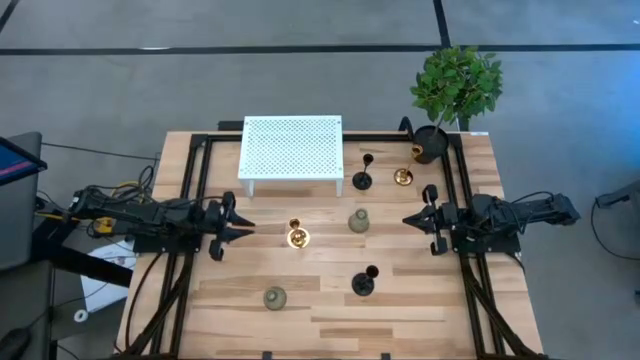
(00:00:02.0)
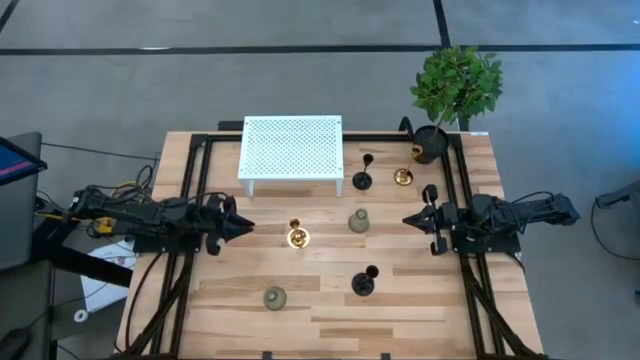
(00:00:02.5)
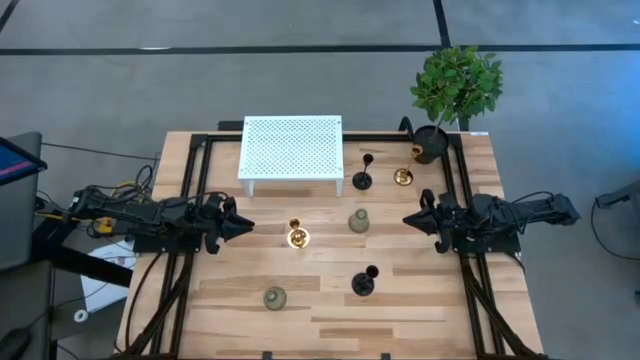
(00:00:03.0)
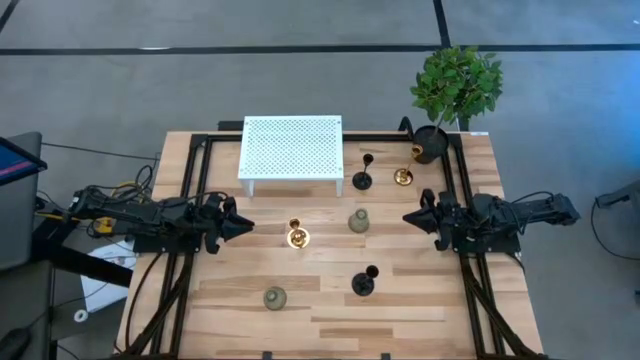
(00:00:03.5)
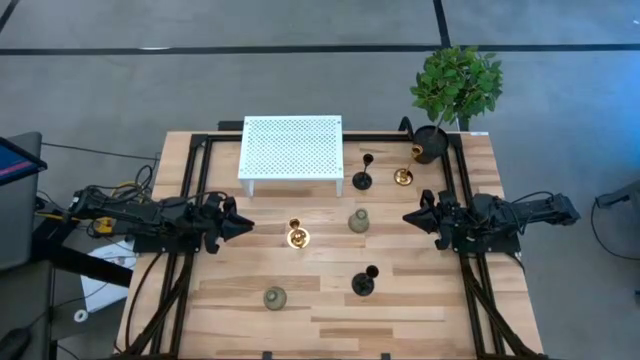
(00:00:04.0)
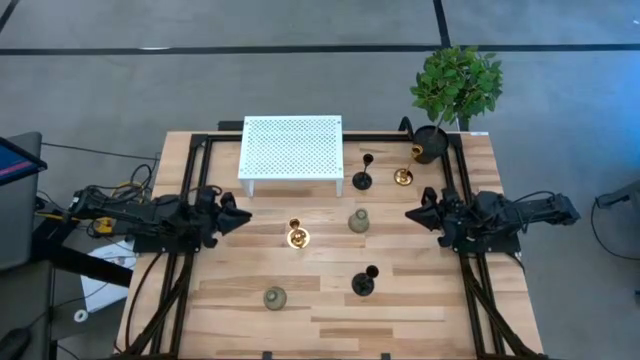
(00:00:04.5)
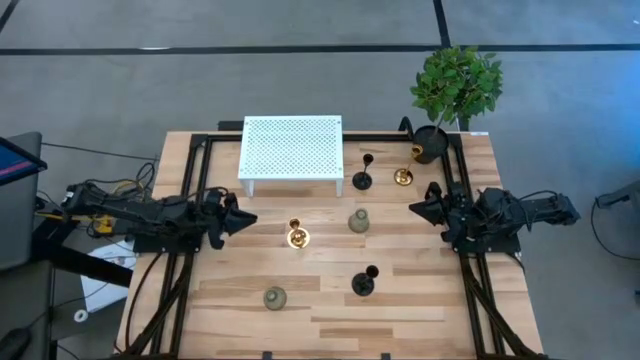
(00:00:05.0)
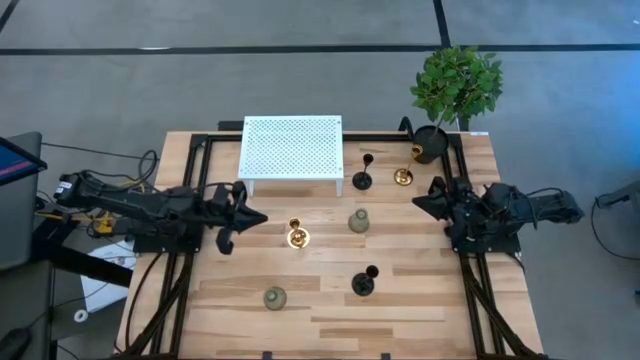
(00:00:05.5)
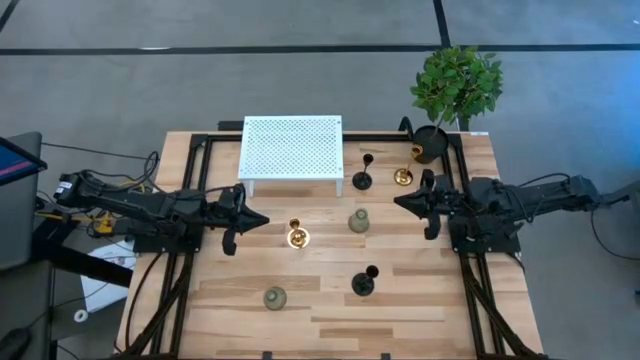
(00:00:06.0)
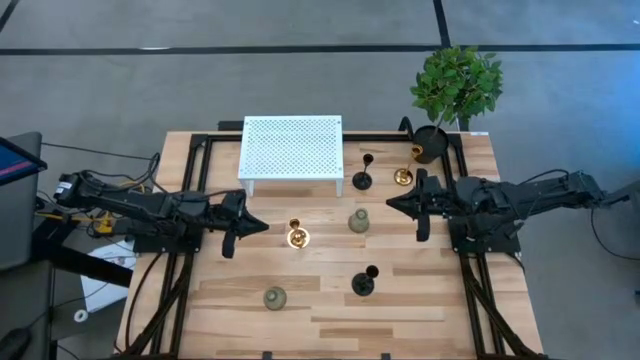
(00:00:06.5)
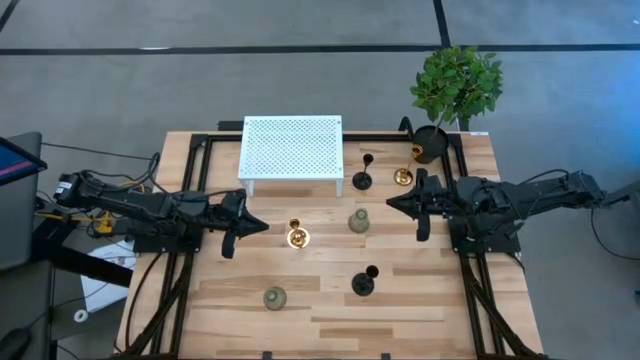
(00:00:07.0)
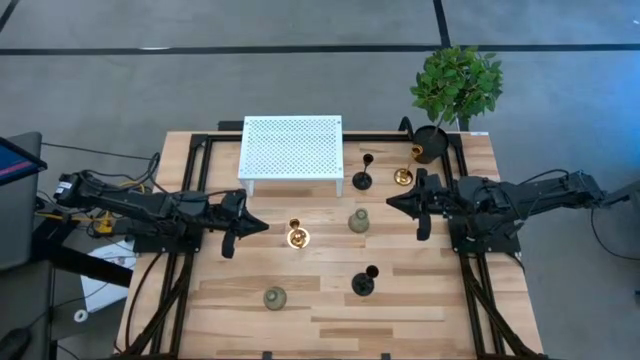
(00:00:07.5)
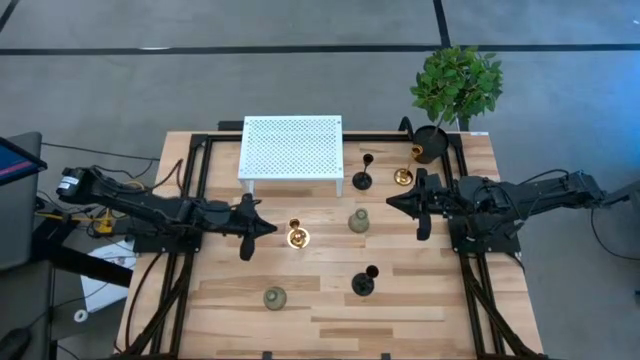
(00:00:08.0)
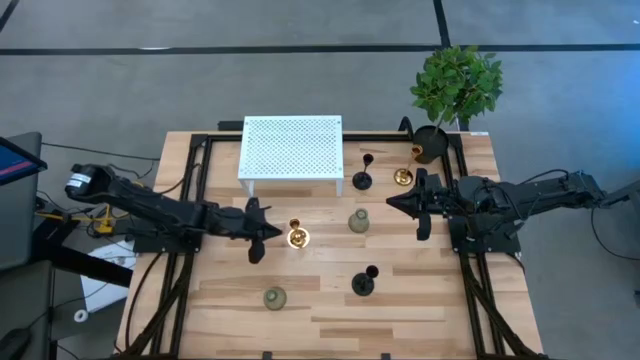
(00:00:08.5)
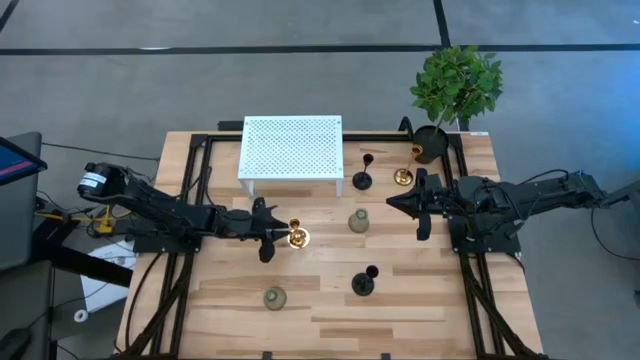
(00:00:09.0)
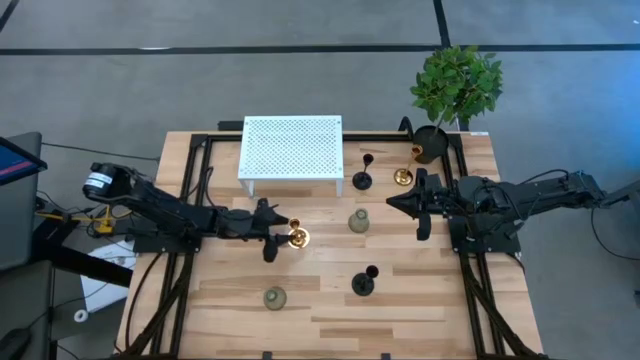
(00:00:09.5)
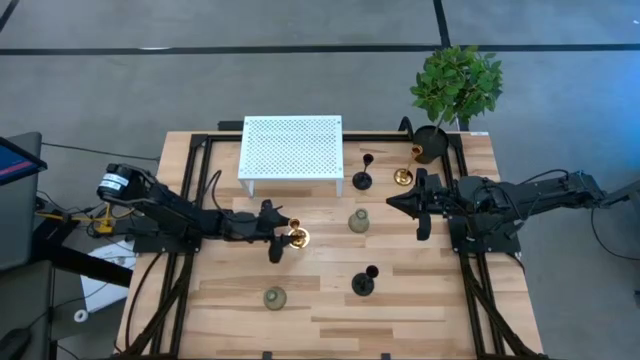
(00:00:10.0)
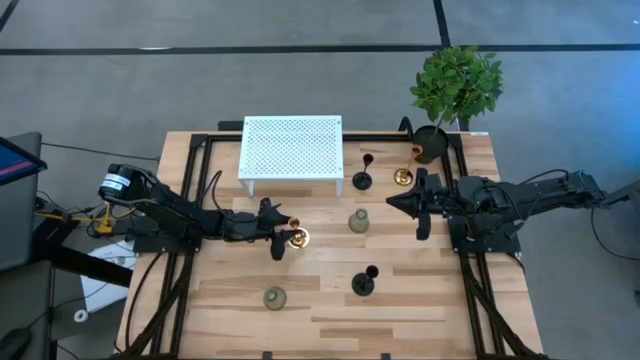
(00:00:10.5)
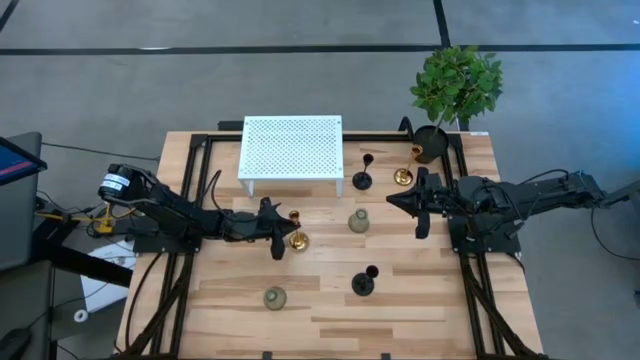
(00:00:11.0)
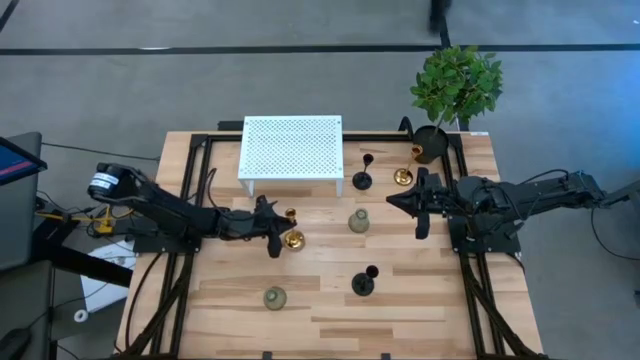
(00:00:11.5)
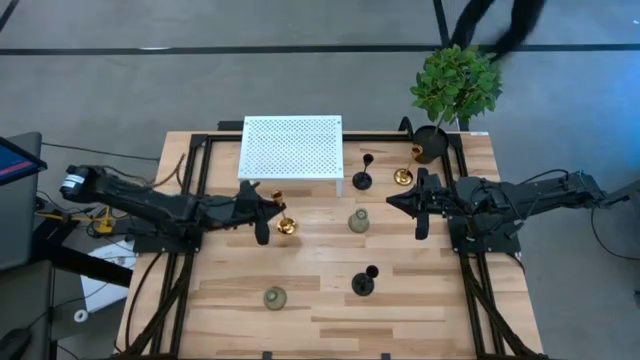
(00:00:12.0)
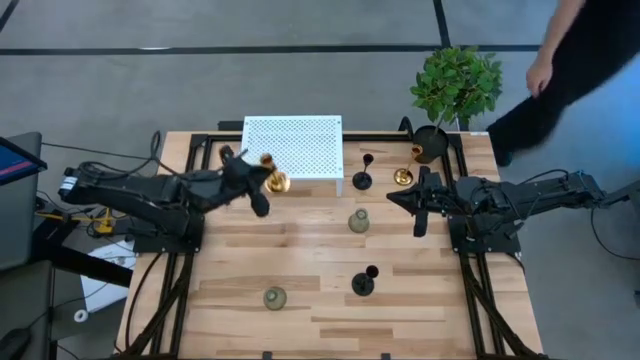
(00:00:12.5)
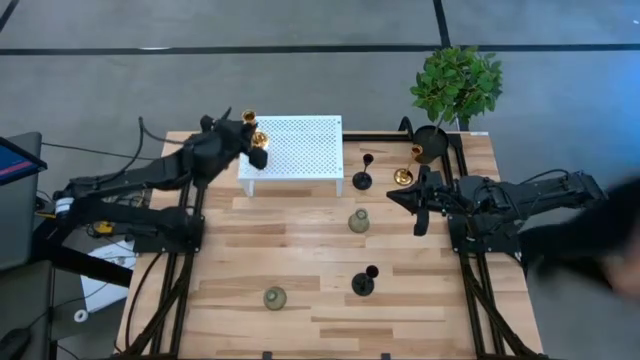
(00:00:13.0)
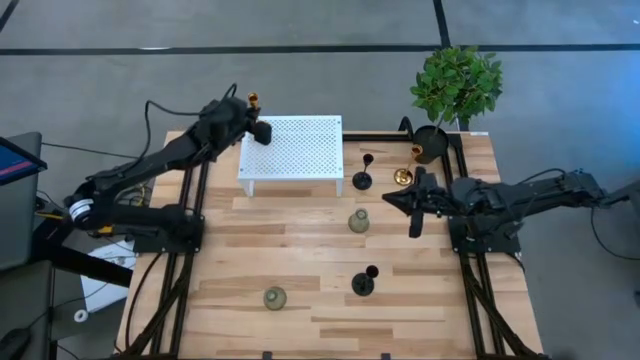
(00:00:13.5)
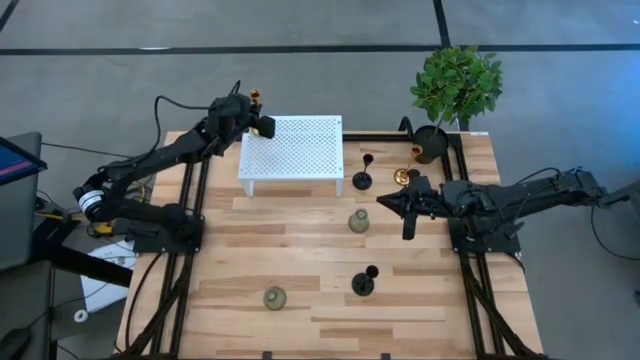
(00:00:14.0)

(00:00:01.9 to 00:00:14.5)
Task: Pick & Place candle stick holders
Put the bottom golden candle holder on the shelf

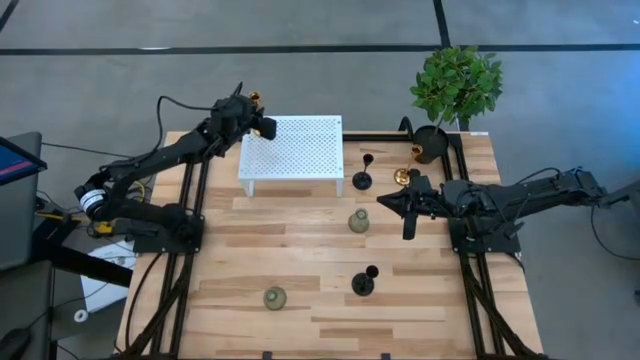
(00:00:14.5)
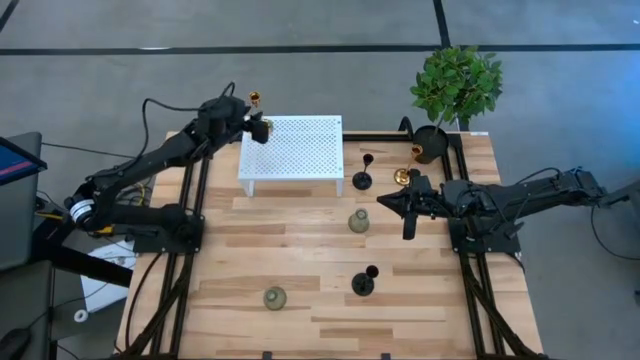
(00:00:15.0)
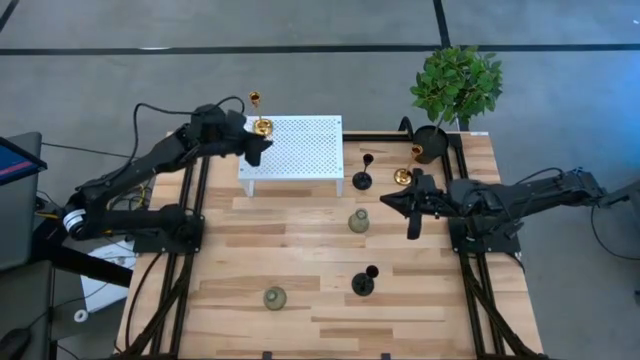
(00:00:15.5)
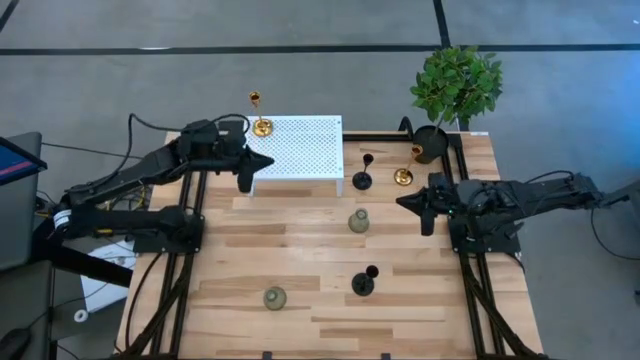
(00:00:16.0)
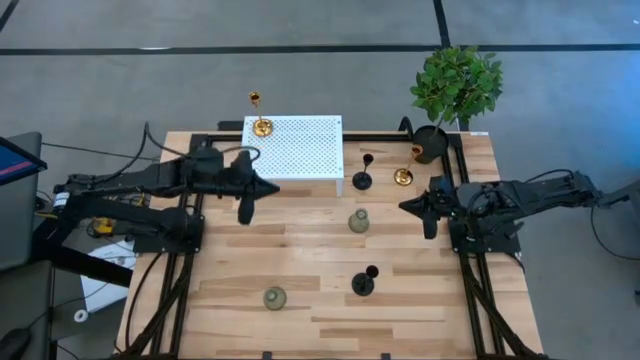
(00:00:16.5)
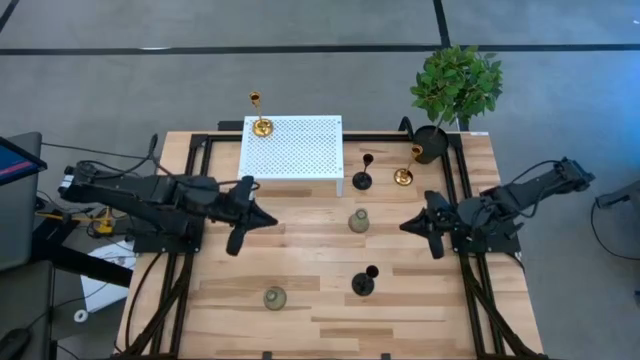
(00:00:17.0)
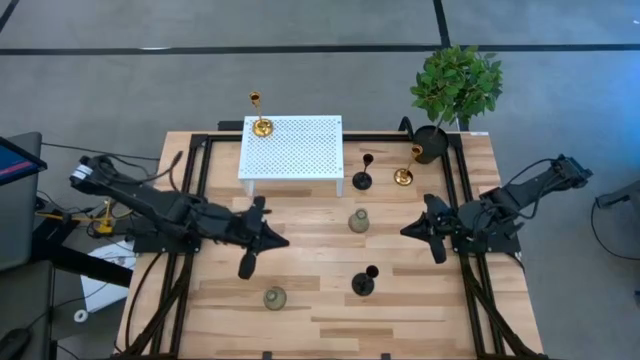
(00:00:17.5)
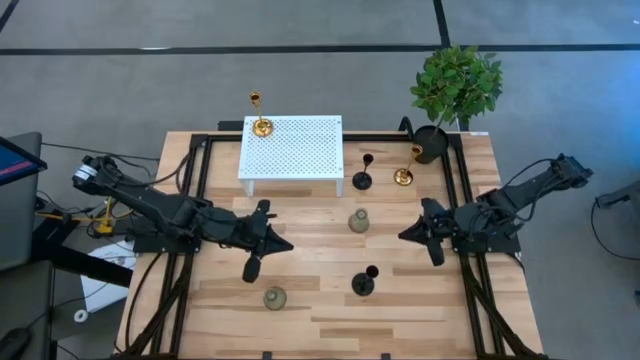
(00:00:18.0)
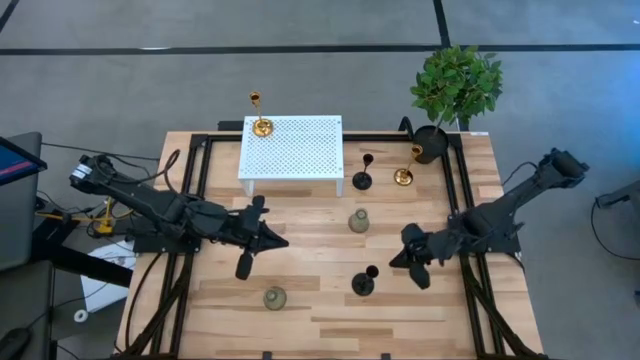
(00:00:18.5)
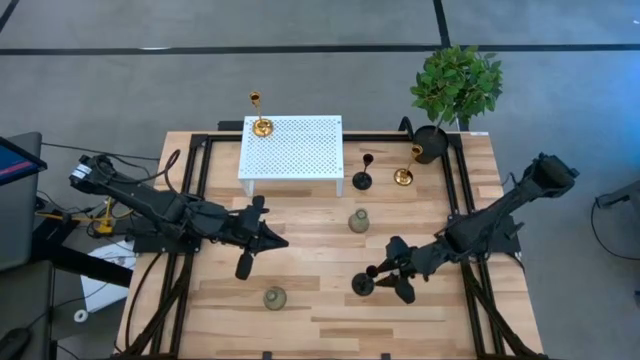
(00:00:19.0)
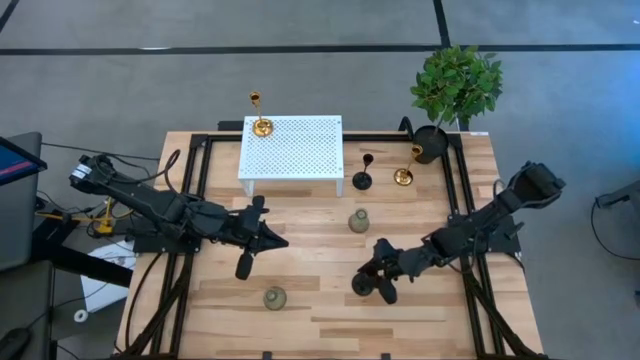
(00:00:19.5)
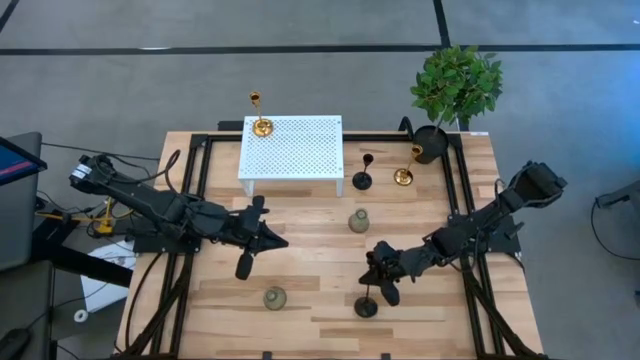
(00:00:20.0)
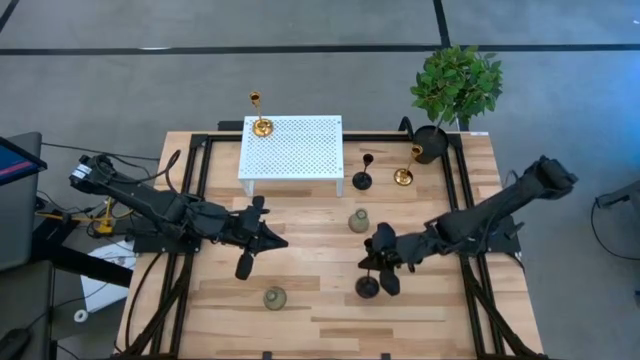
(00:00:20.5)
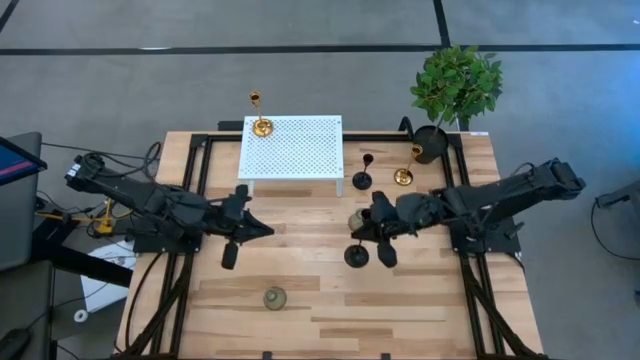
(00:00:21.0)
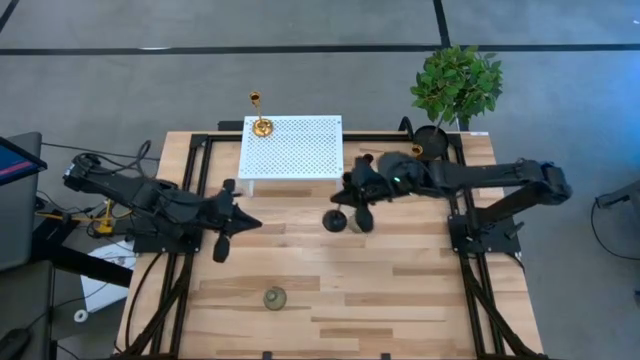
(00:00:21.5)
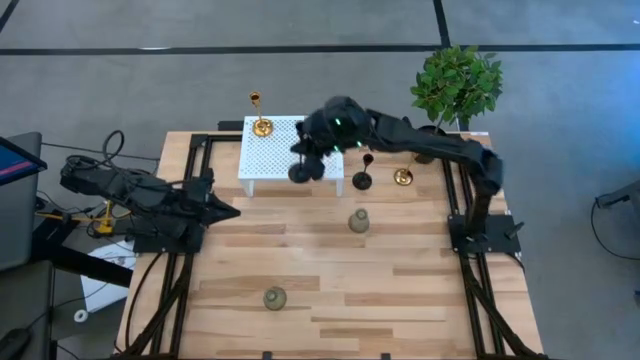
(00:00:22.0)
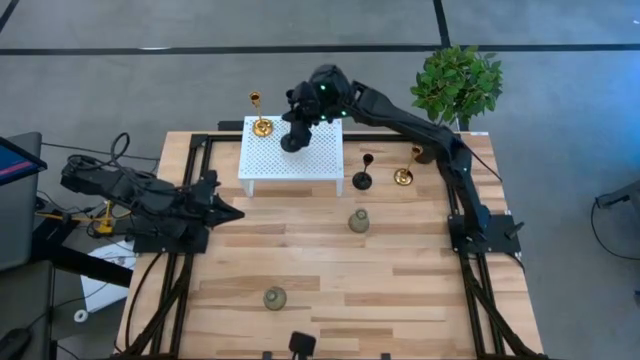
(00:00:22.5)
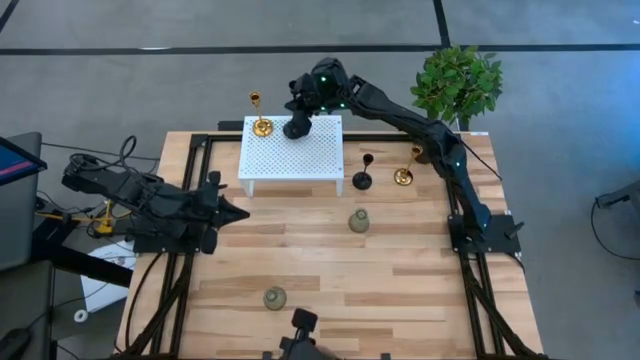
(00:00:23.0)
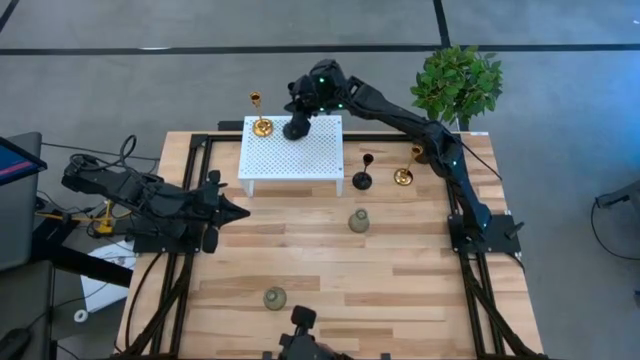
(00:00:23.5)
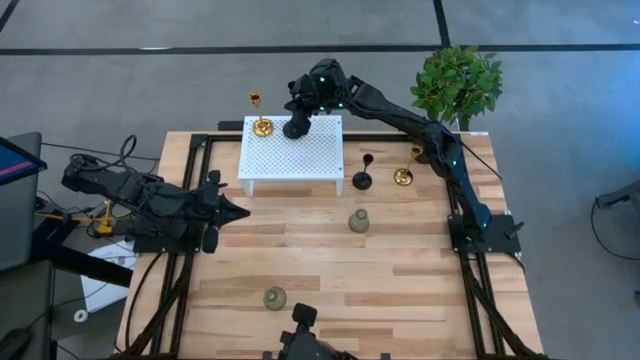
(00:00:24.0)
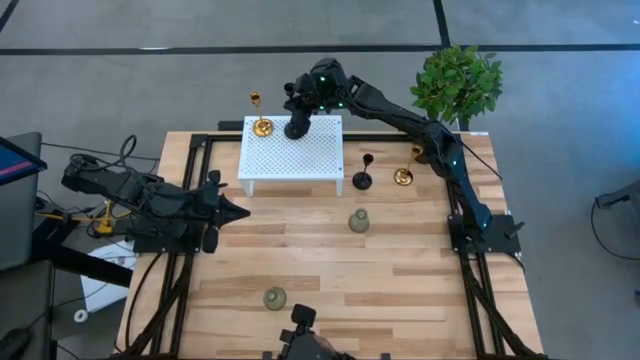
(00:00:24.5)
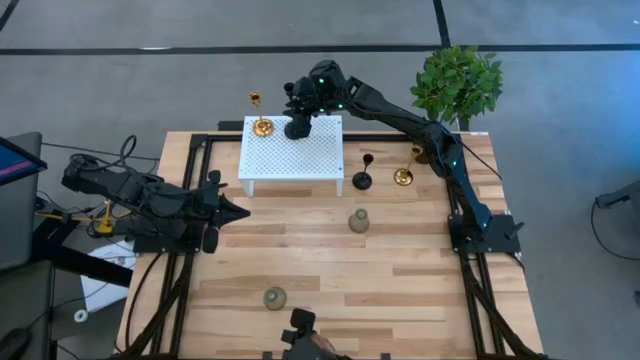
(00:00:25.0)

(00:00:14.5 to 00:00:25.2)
Put the bottom black candle holder on the shelf
